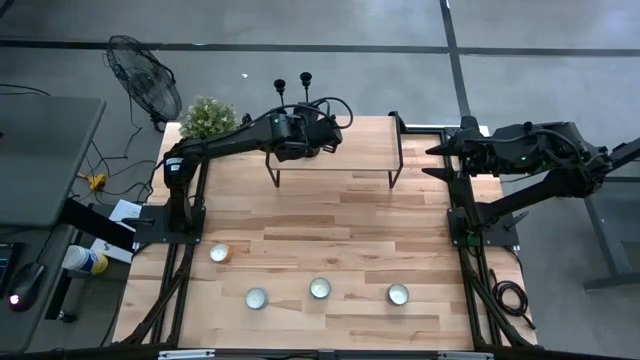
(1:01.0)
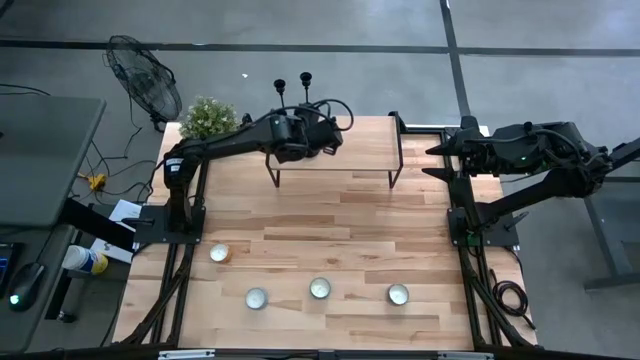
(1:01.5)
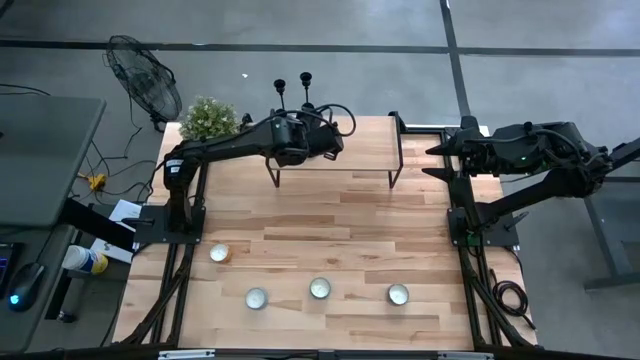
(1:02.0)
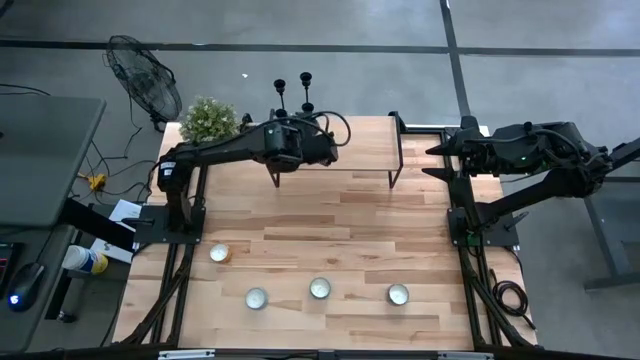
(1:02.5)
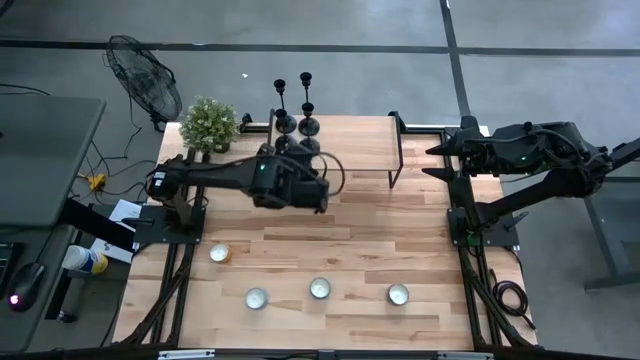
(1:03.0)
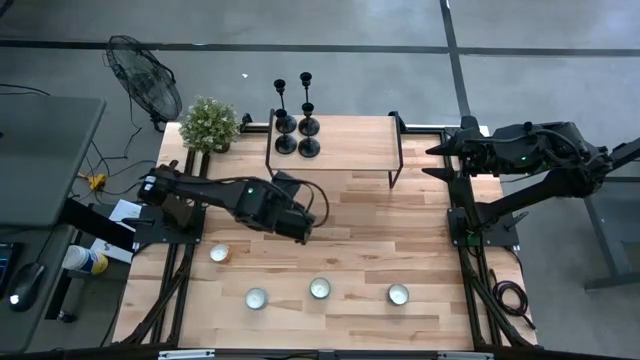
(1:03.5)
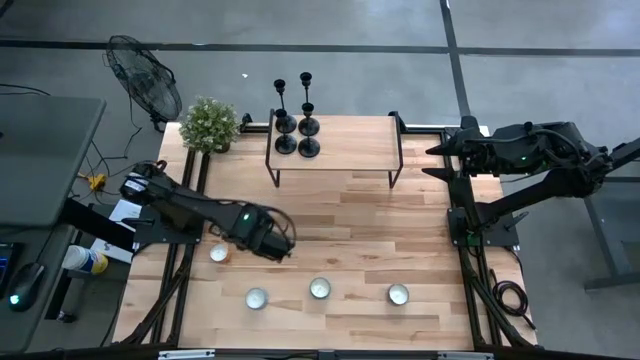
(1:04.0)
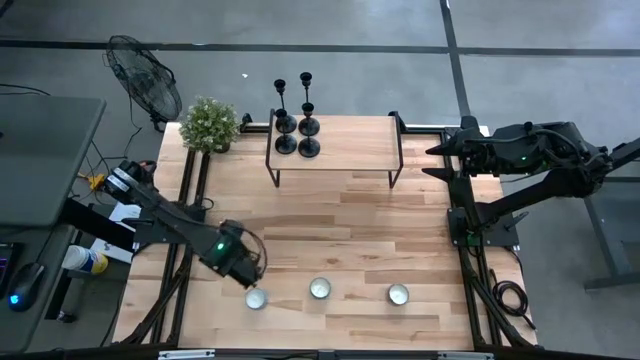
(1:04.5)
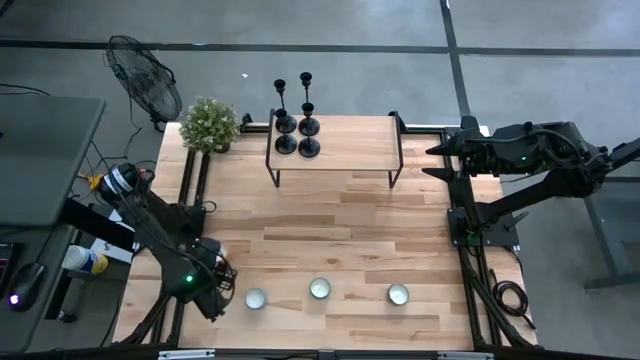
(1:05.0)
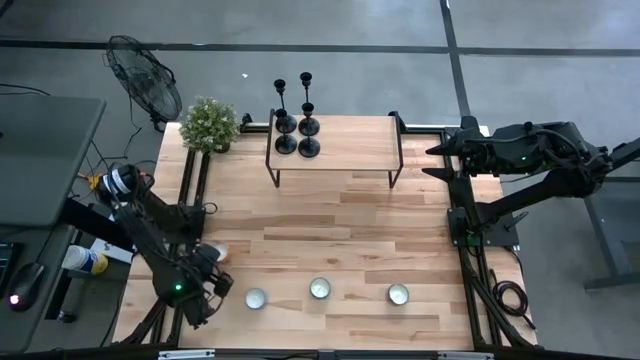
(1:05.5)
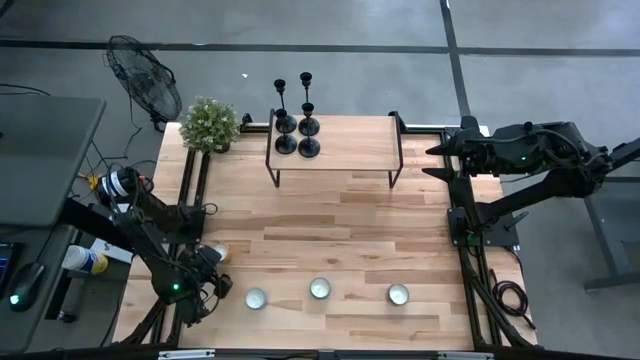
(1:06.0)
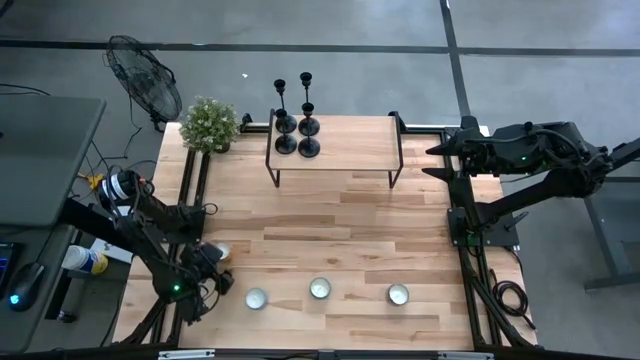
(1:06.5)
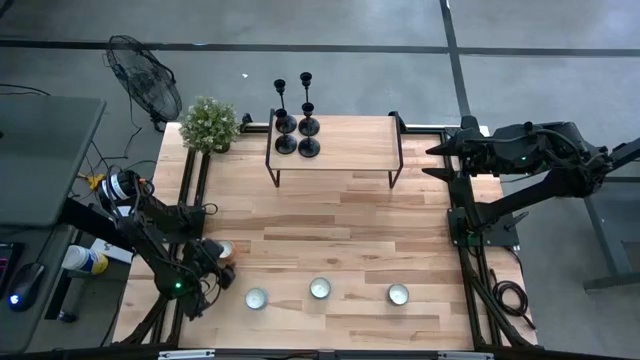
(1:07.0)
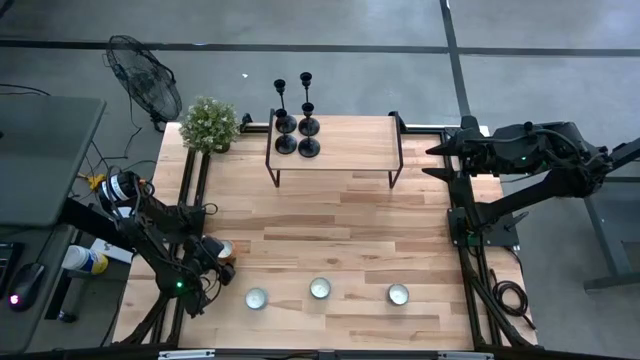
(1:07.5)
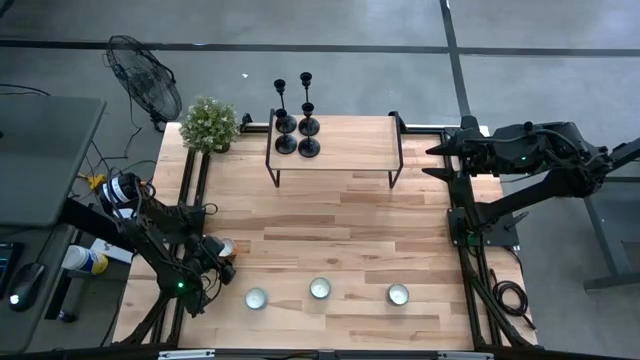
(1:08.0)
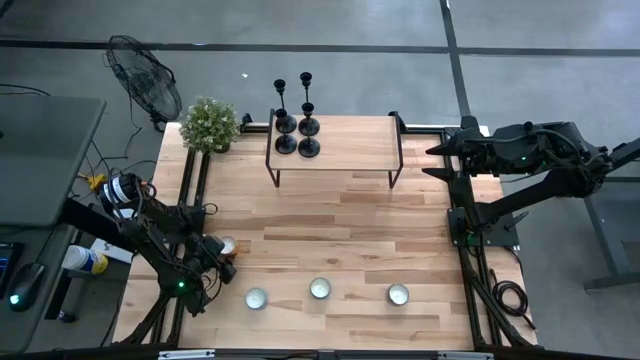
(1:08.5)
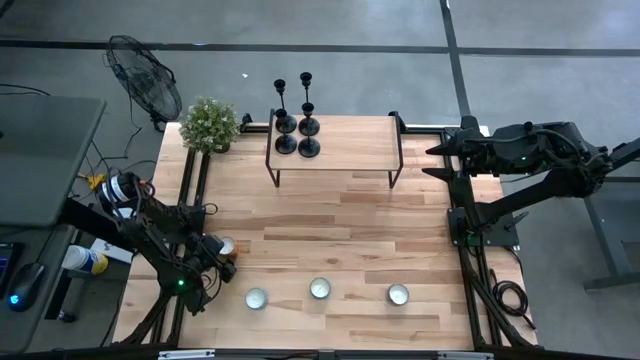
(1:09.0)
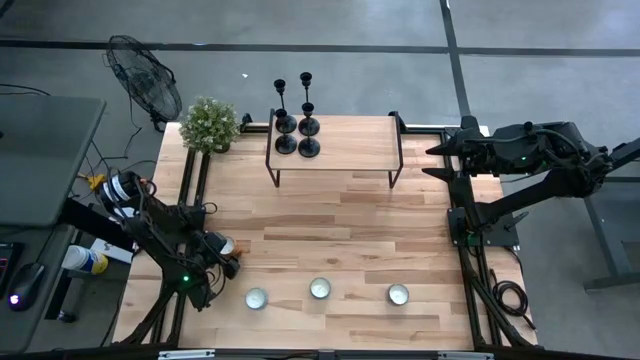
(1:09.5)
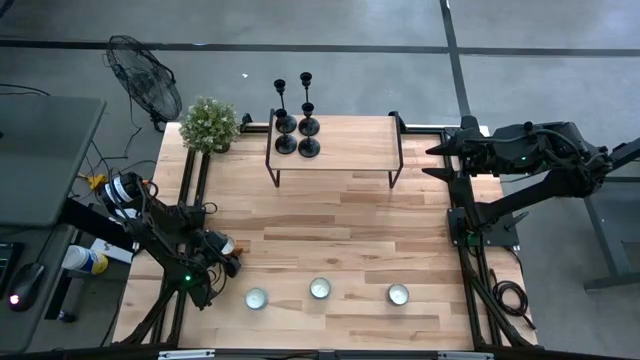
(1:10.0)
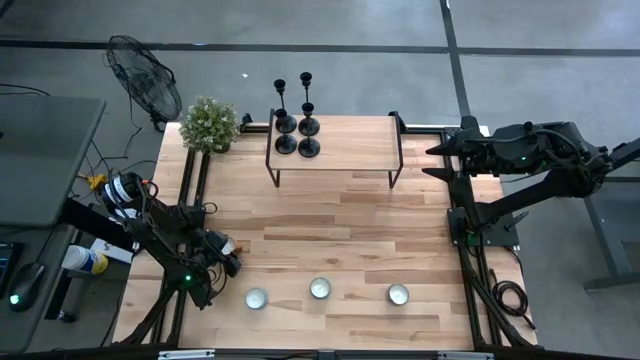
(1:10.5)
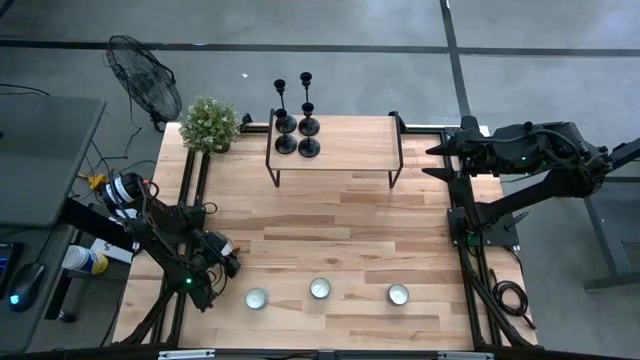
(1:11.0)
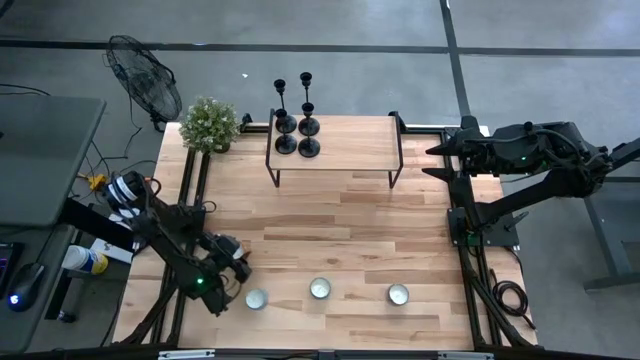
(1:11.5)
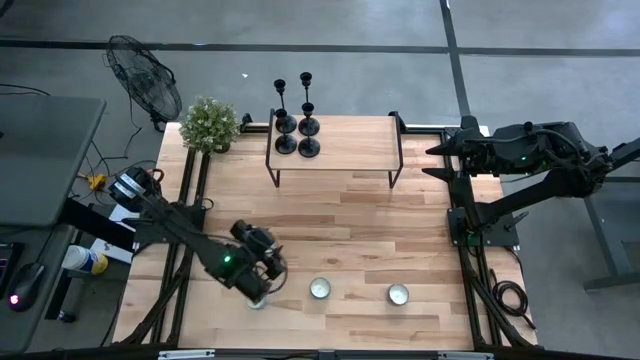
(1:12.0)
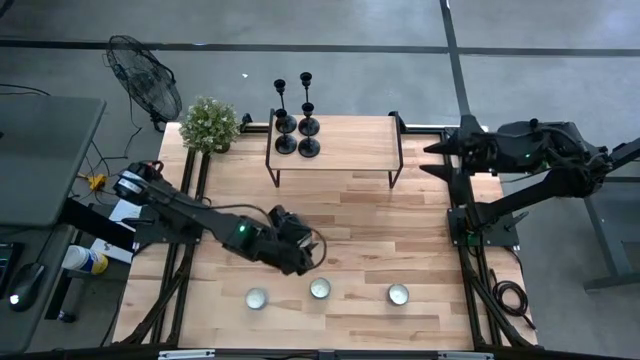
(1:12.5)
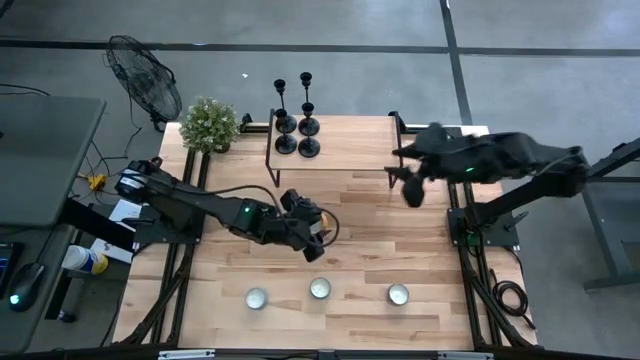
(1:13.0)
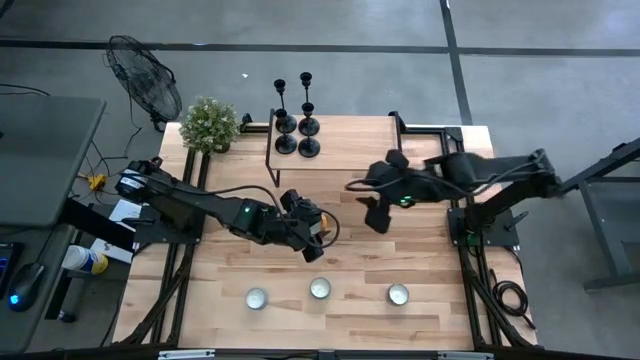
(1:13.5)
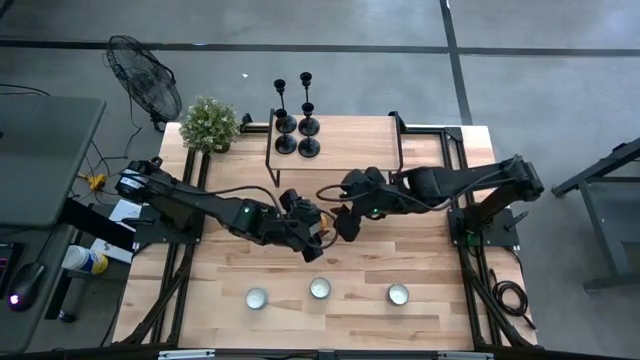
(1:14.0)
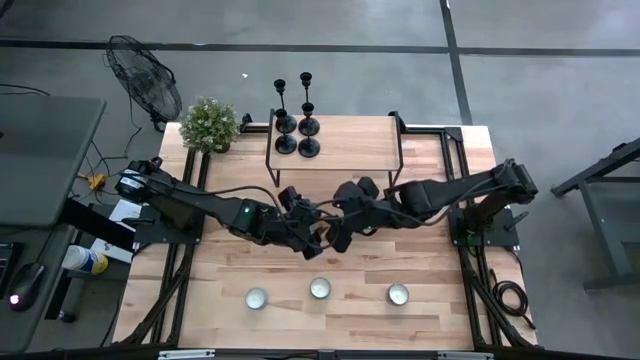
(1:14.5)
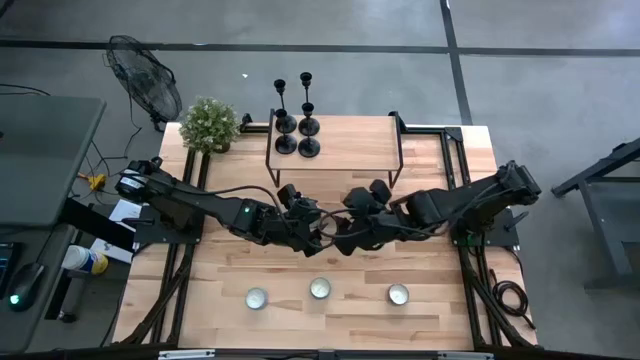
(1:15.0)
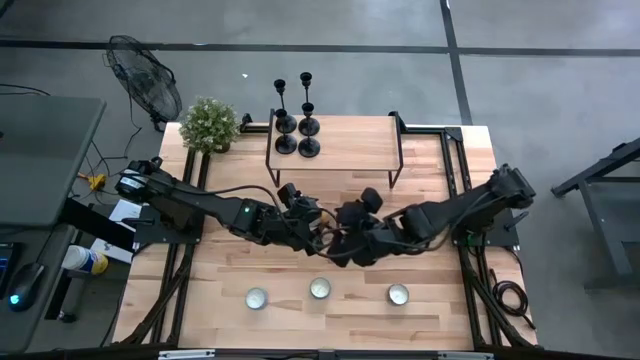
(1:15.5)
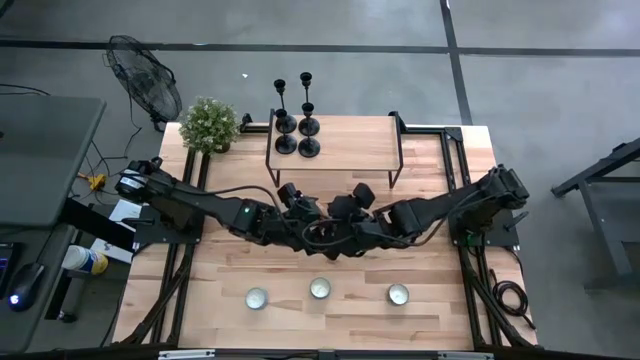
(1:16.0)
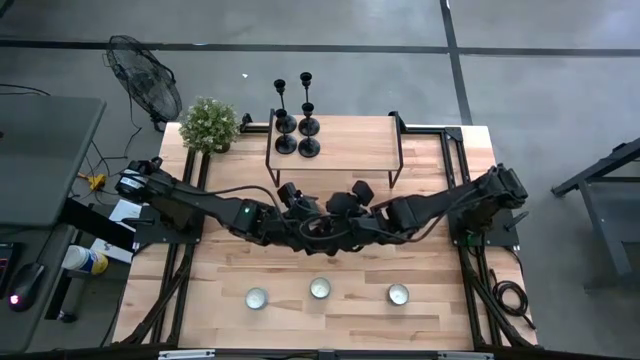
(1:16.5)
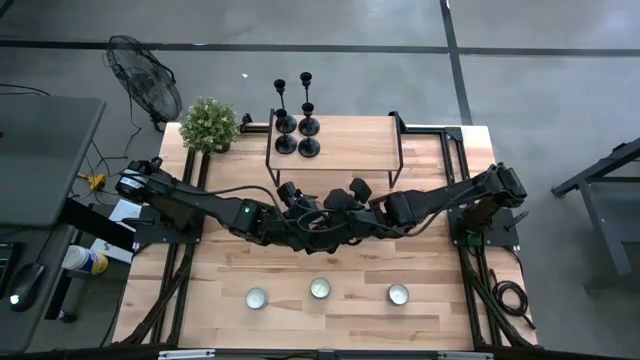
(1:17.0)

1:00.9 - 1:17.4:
Task: Pick & Place candle stick holders
Put the orange scented candle on the shelf

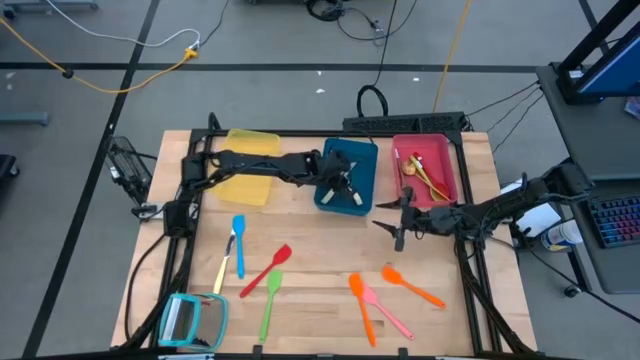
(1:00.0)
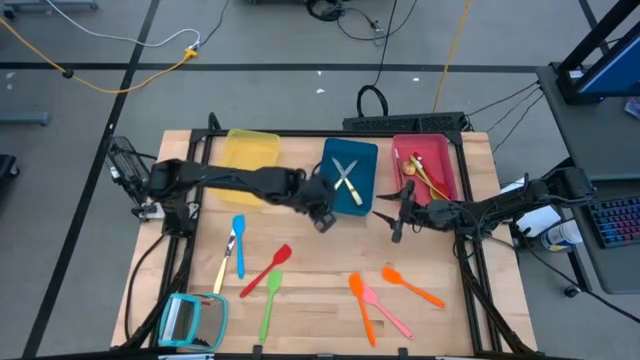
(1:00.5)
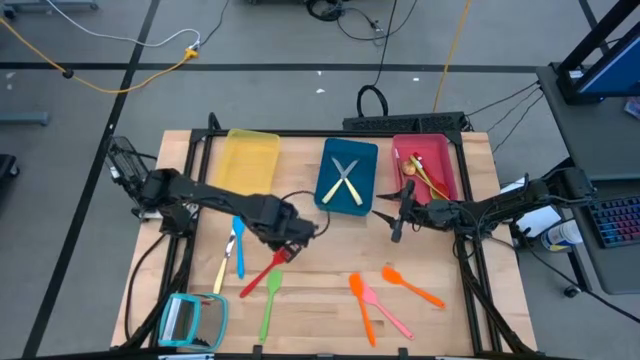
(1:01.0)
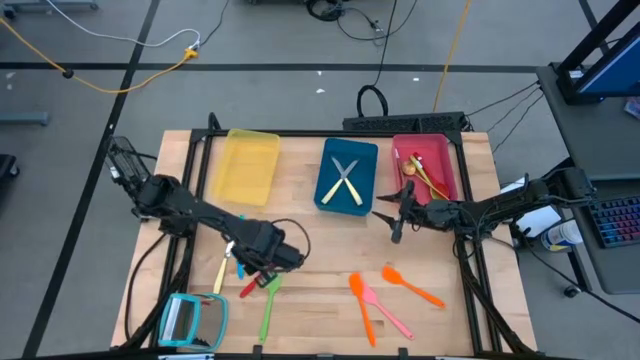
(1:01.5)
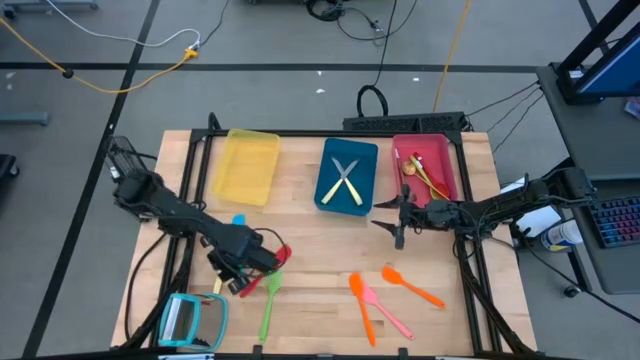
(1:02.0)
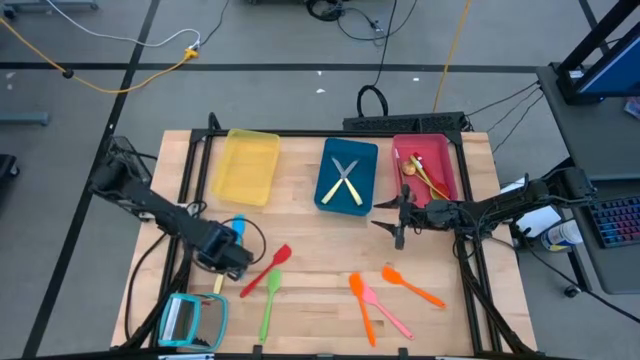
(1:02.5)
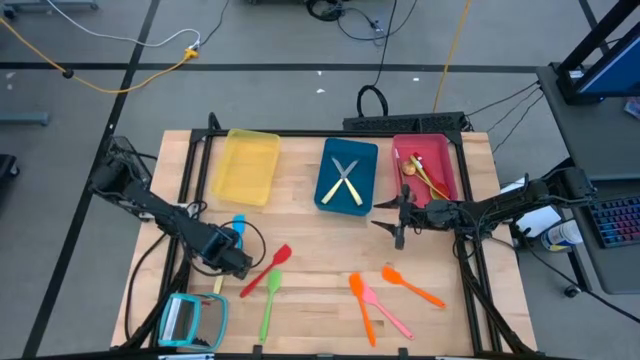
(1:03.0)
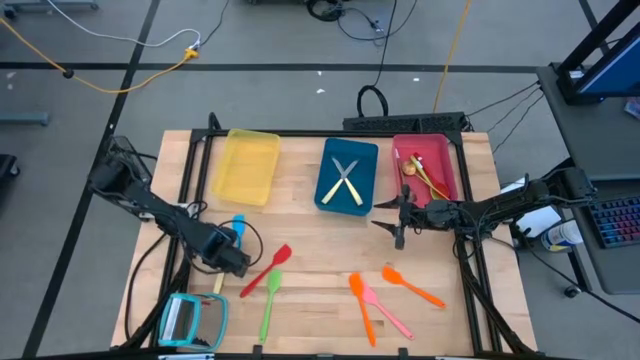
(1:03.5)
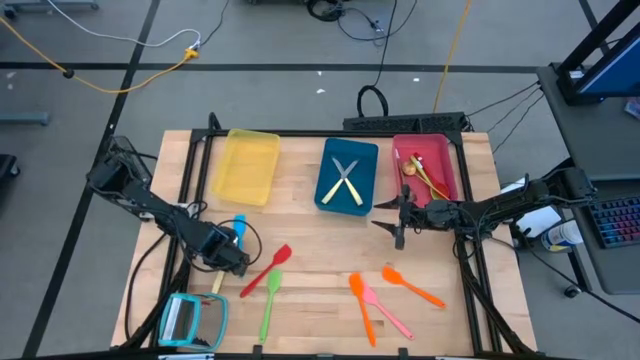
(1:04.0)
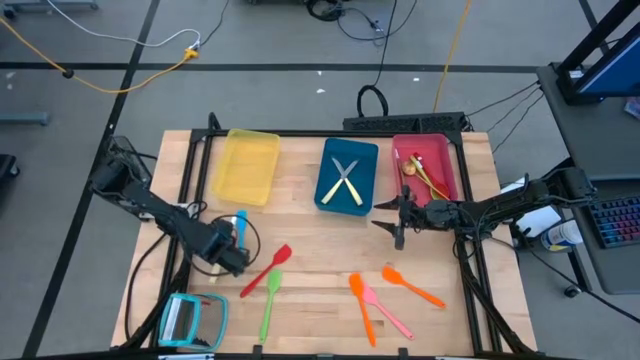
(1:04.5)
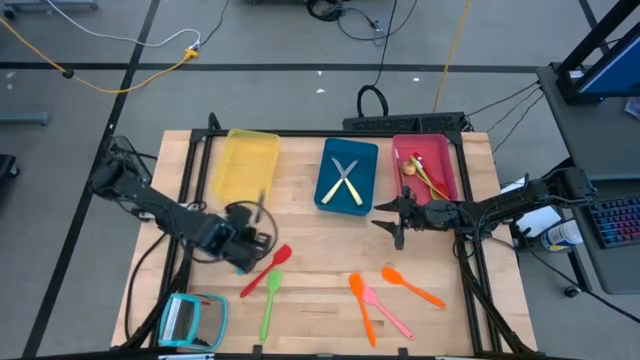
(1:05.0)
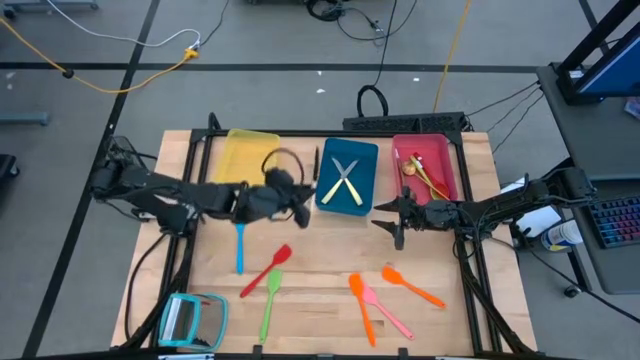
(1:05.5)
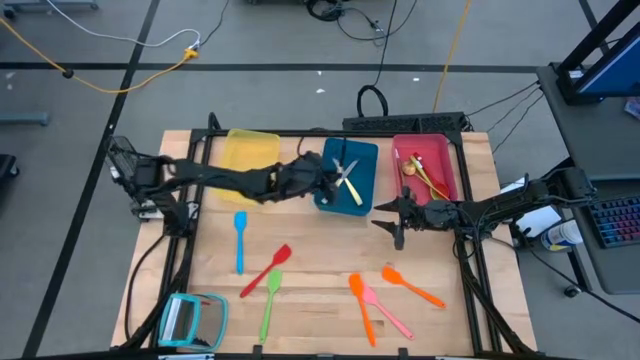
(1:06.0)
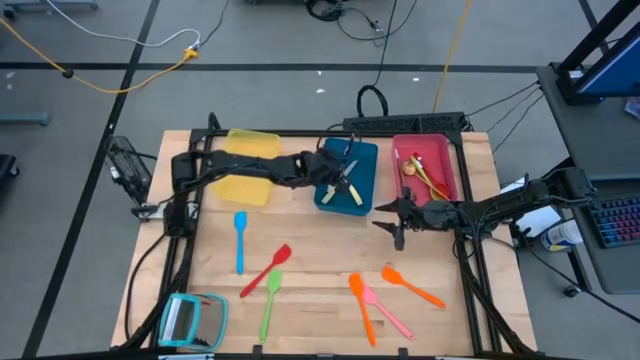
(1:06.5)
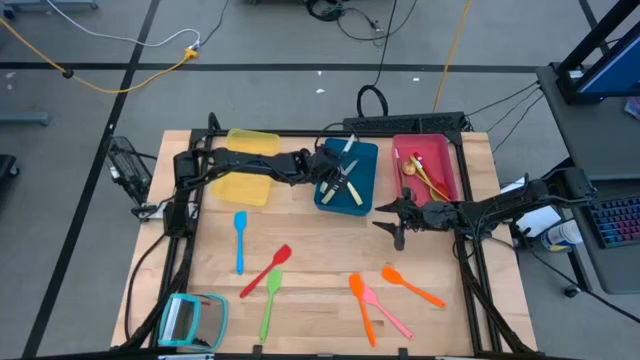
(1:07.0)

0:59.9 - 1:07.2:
Task: Pick & Place Kitchen Items
Put the yellow table knife into the blue bin
